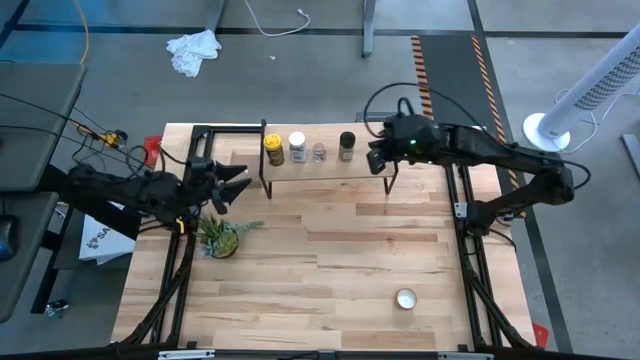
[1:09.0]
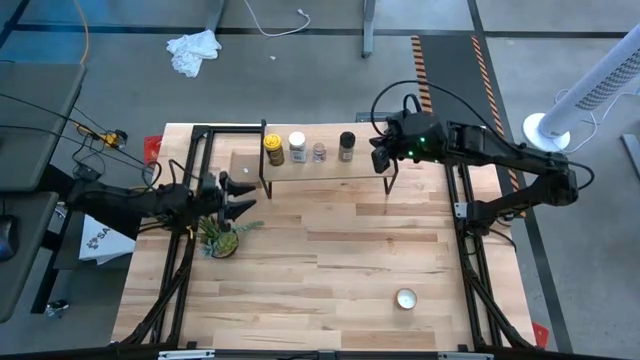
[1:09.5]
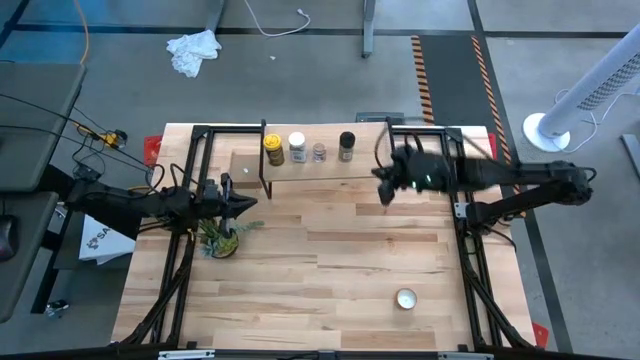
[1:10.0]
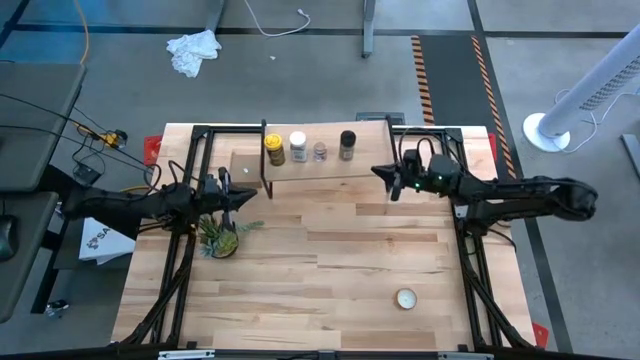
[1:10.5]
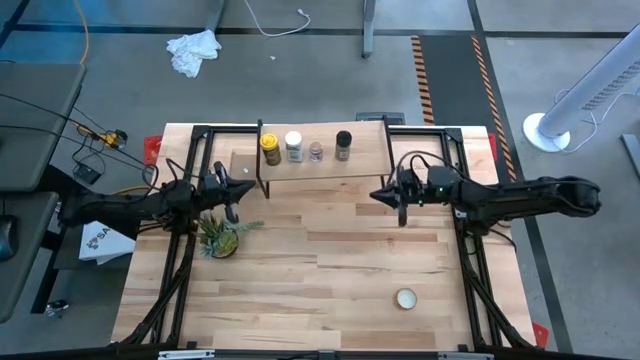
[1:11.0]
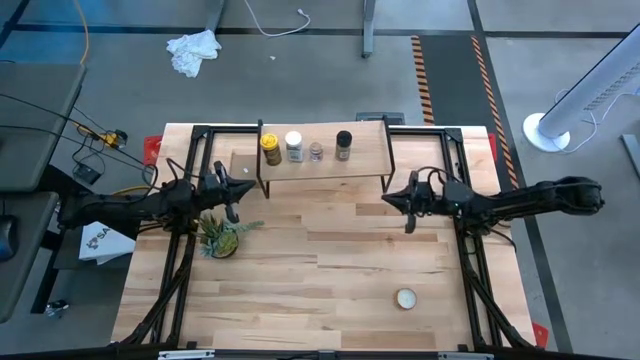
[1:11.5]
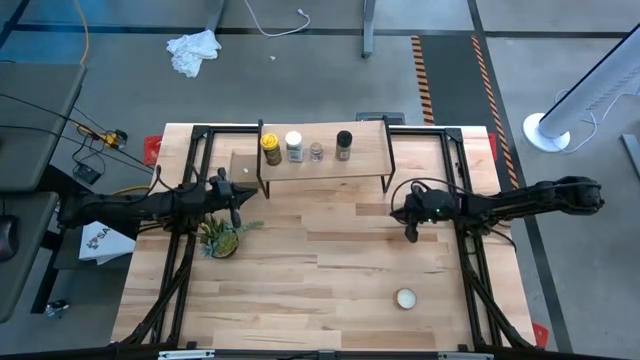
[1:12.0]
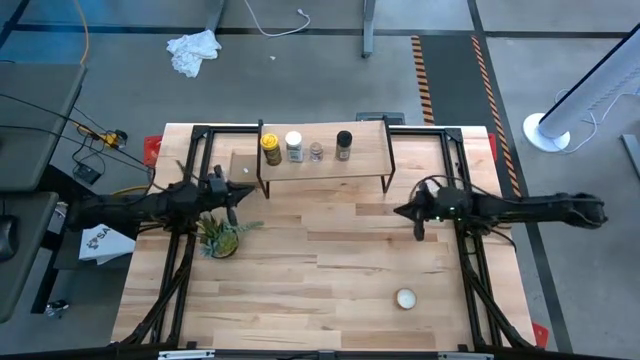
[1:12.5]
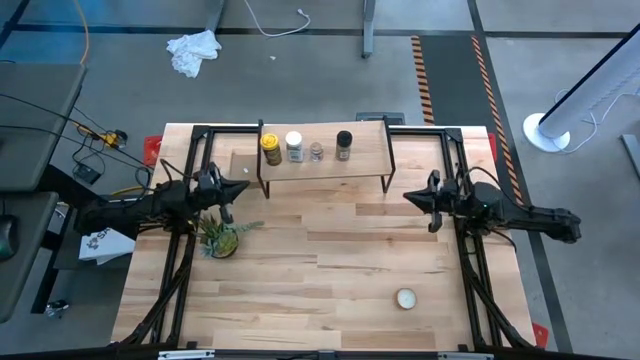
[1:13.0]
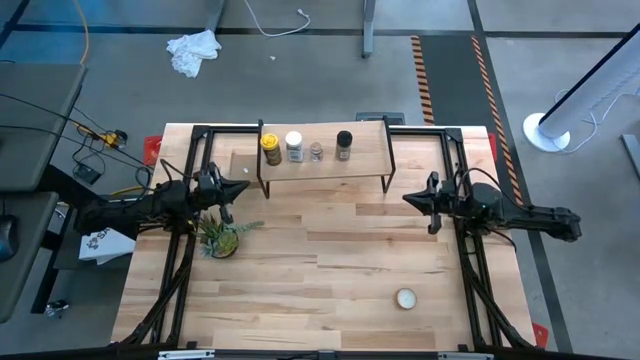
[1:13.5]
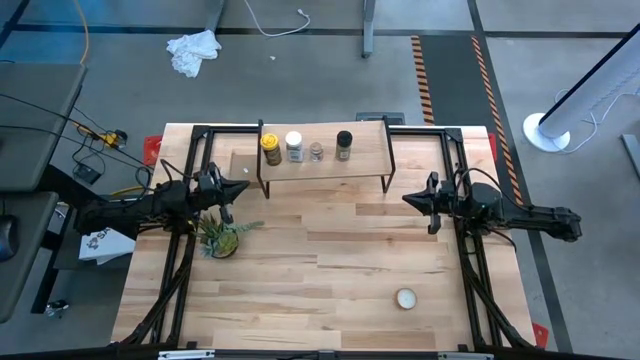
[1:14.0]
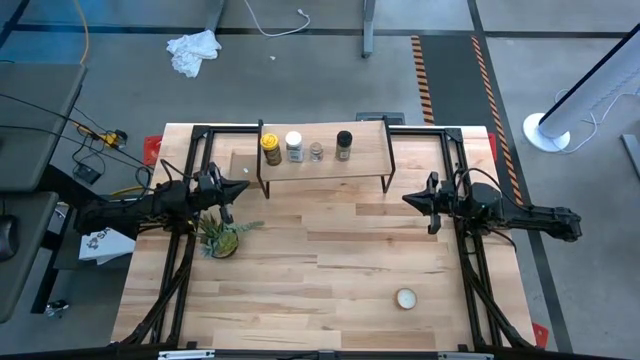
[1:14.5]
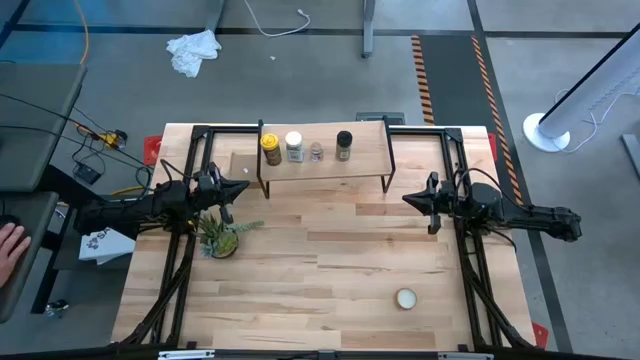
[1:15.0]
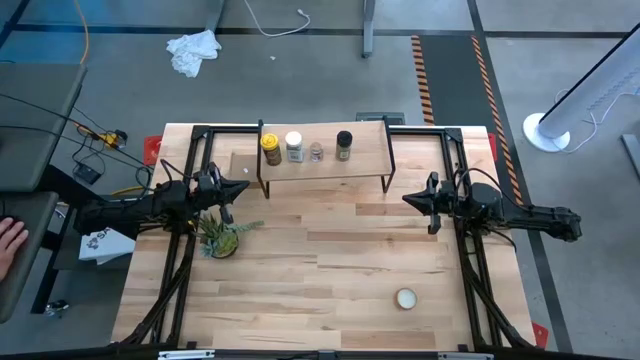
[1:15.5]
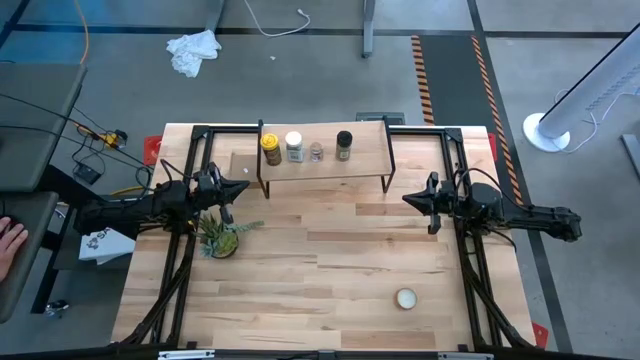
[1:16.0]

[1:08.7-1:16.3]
Task: Shelf spices
Return to Home Position

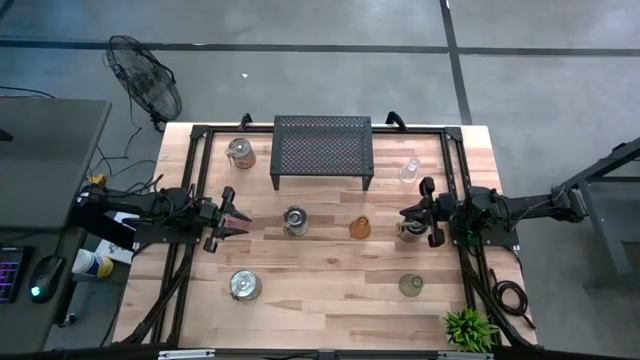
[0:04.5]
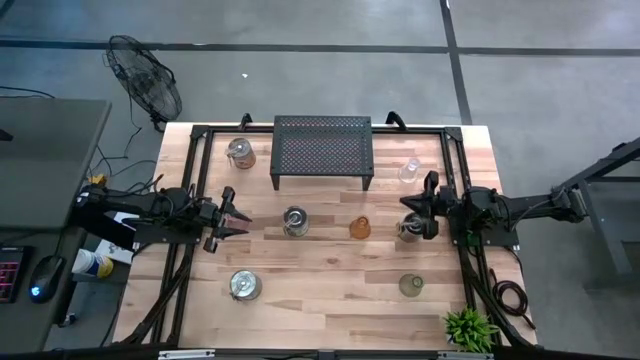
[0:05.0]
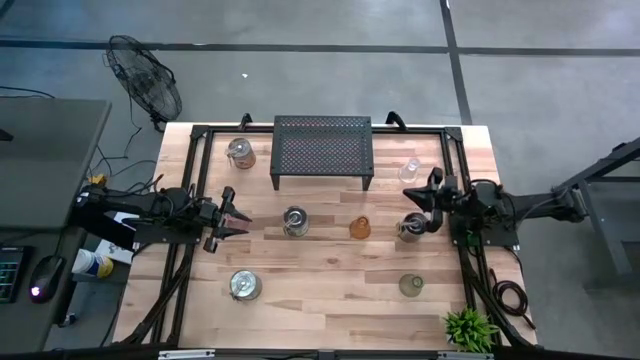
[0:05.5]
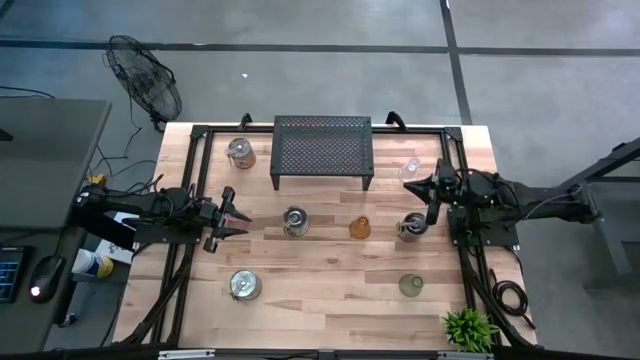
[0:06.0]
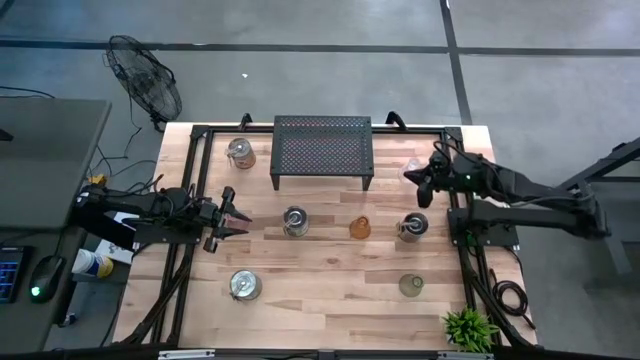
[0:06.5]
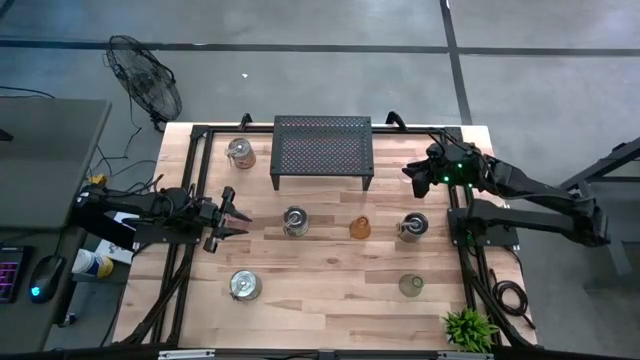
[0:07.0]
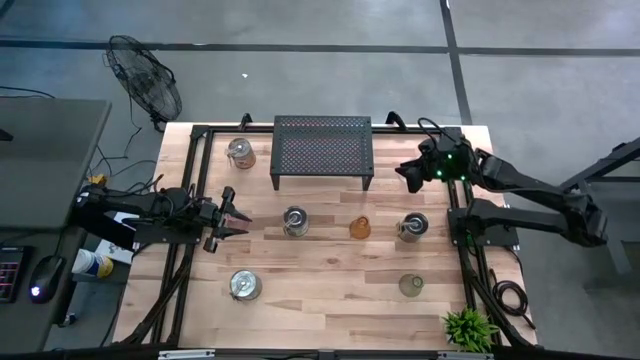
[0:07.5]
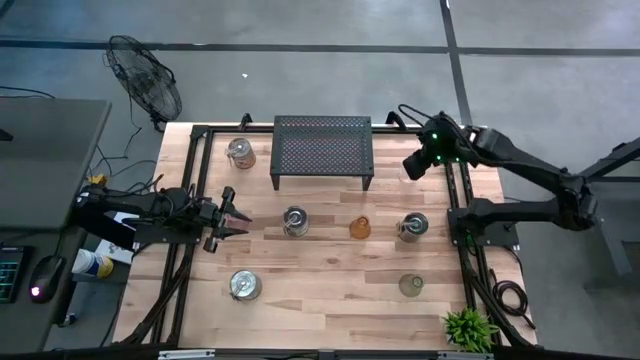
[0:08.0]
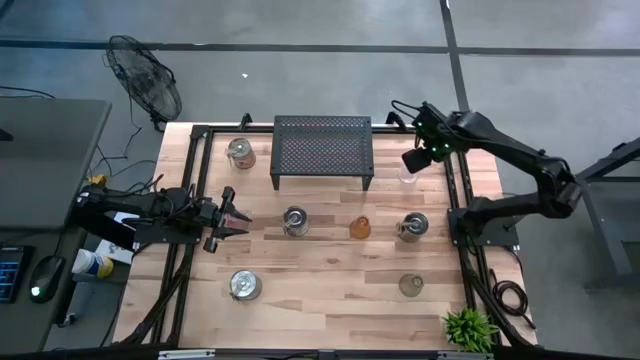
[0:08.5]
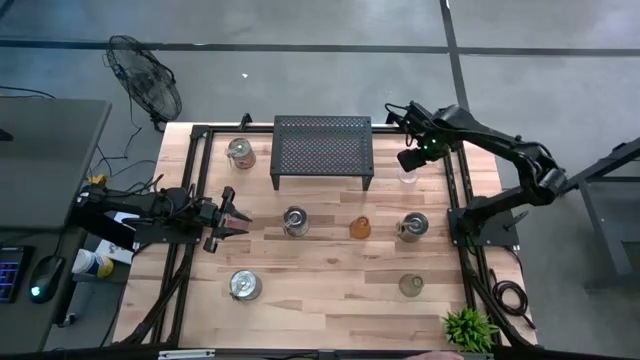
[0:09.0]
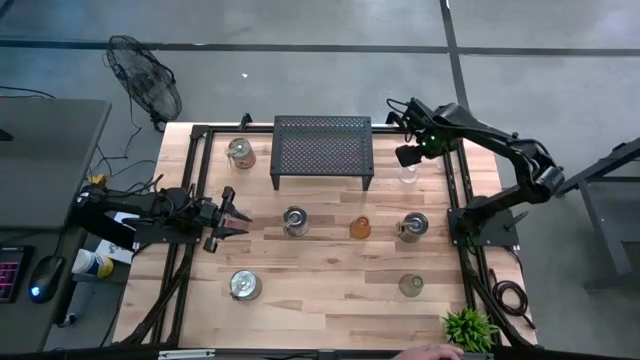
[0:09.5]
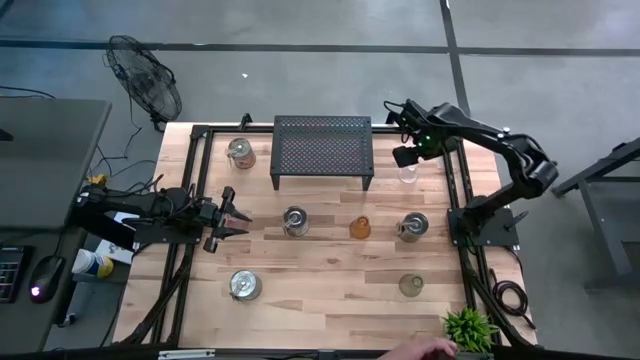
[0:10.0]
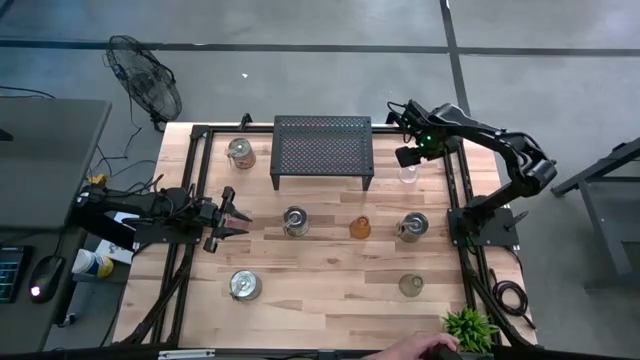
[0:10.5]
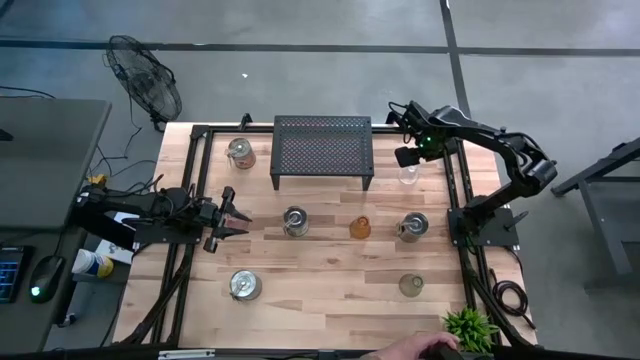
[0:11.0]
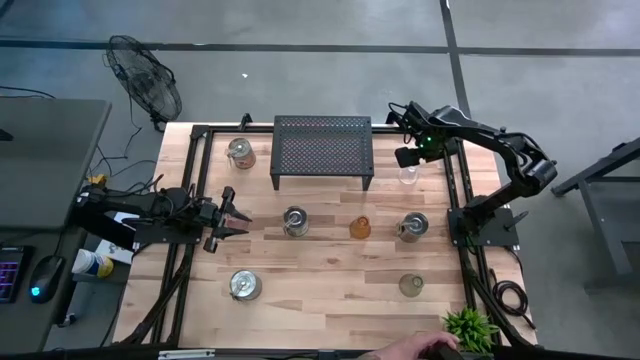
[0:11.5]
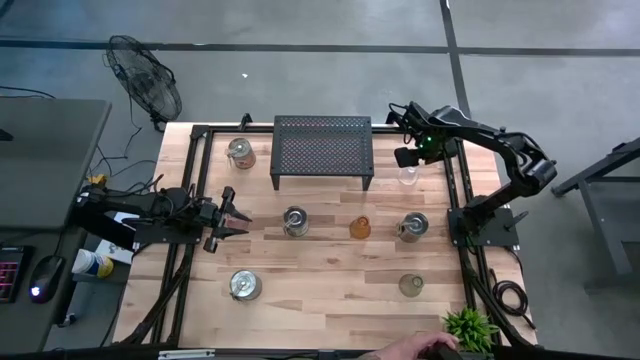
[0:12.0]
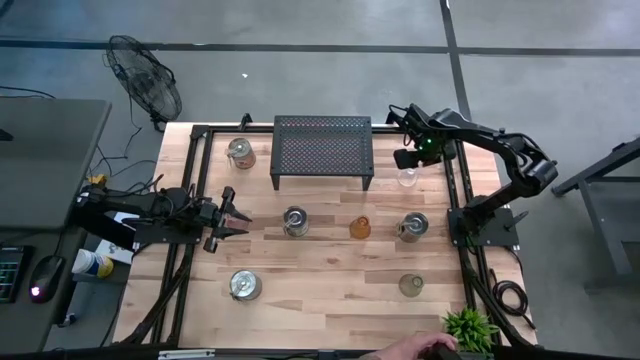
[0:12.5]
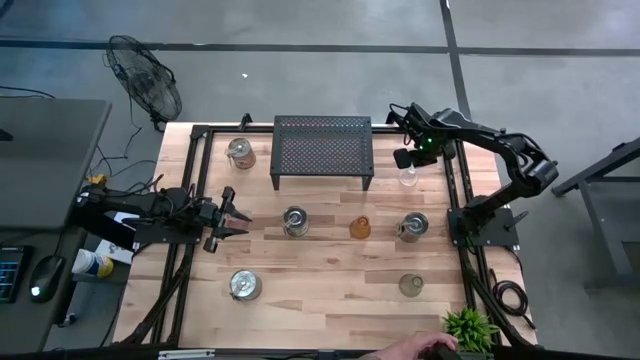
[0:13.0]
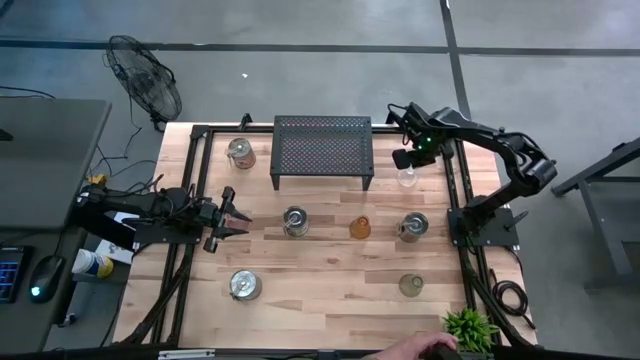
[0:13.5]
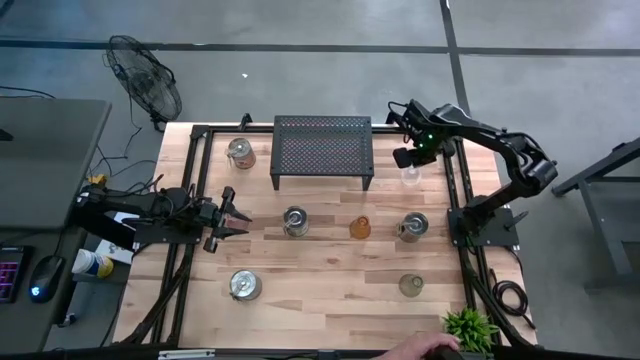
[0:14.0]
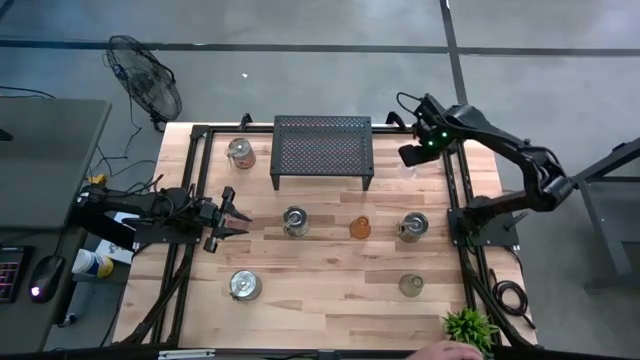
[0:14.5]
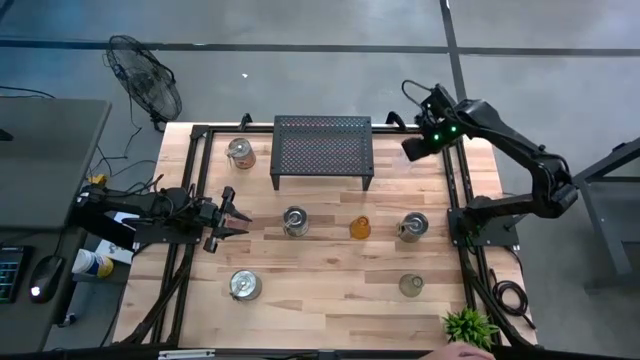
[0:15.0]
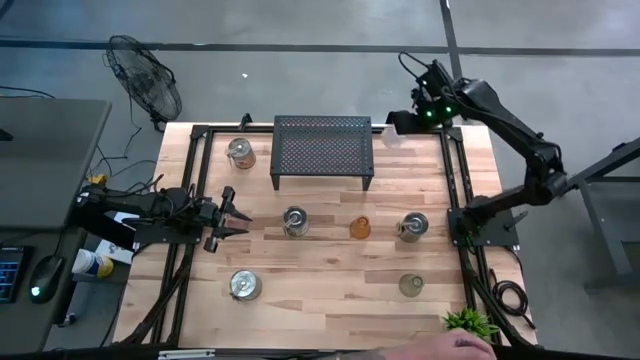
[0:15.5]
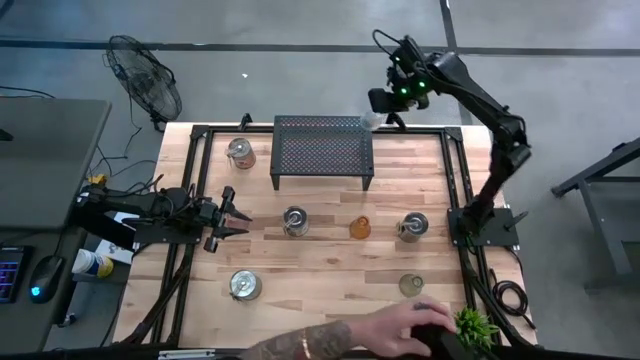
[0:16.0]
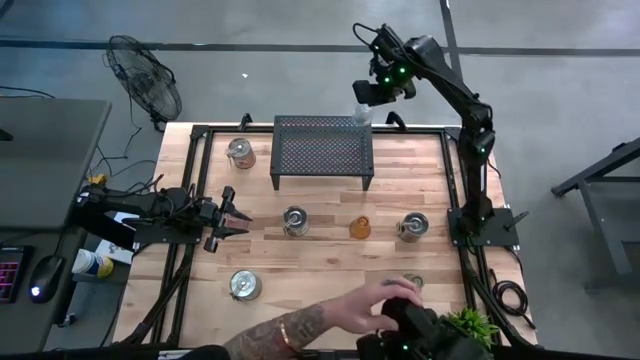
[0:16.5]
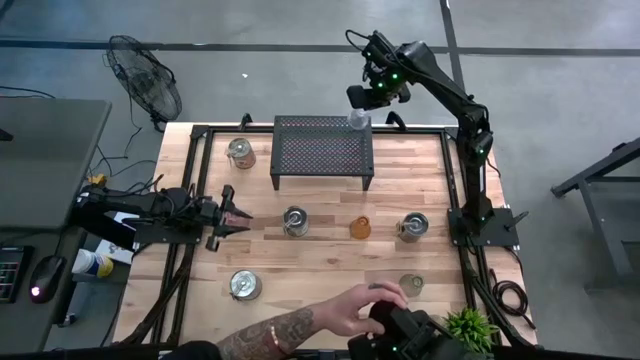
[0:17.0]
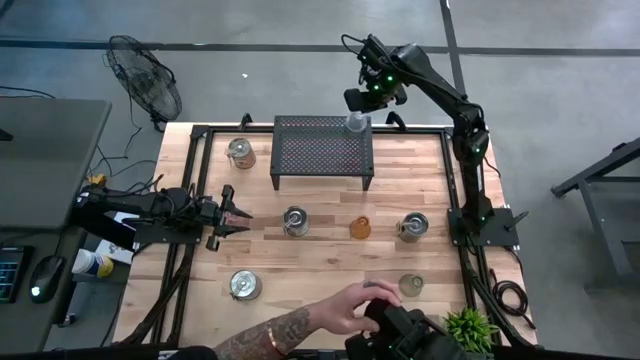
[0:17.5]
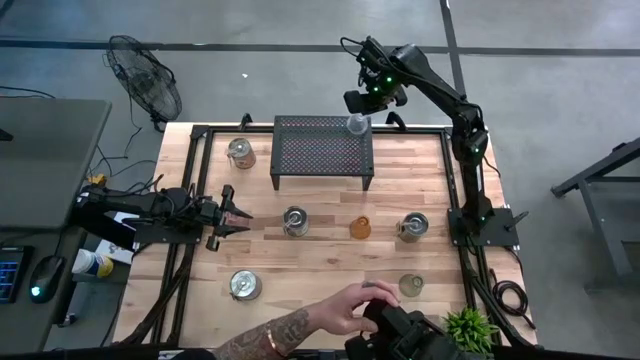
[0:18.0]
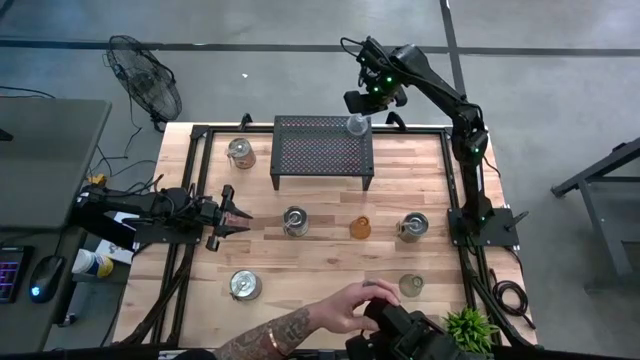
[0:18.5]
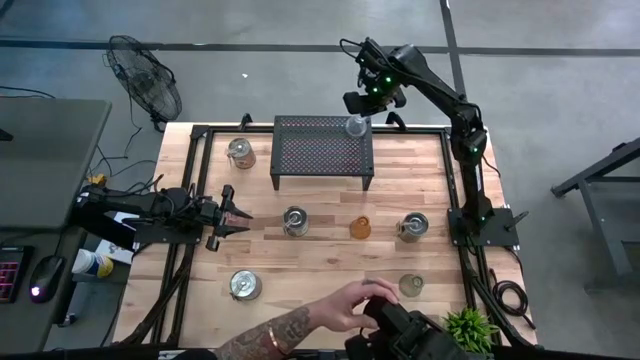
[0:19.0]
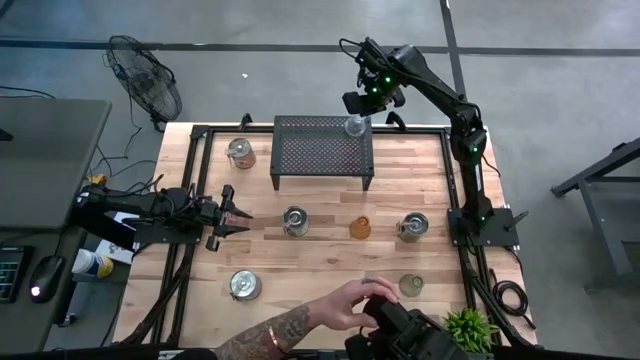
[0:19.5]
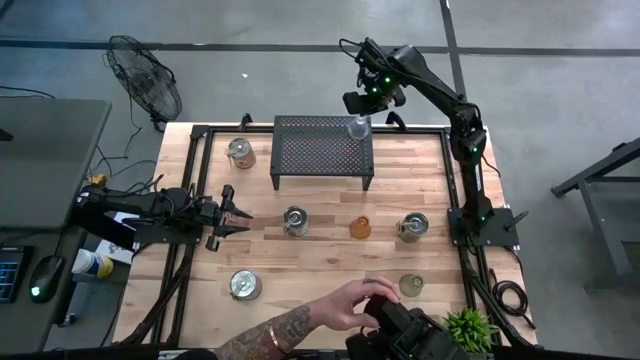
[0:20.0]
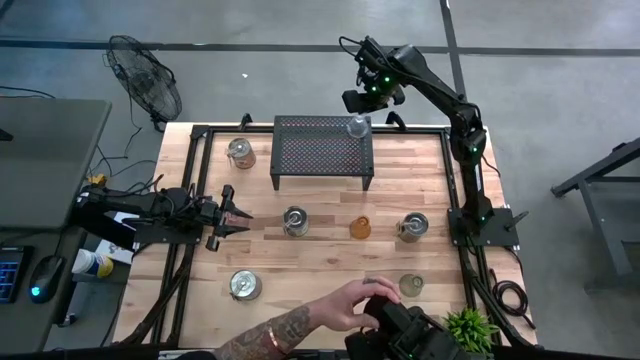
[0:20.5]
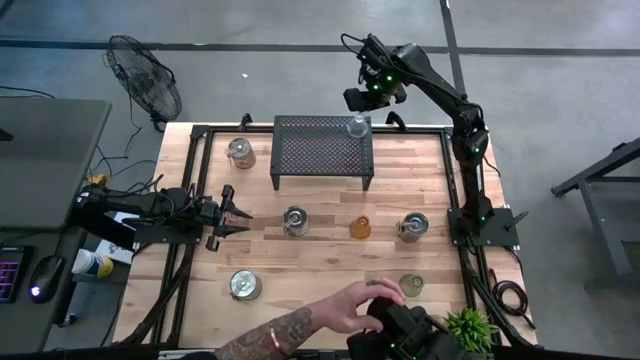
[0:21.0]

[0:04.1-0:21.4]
Task: Pick & Place candle stick holders
Put the transparent candle holder on the shelf
